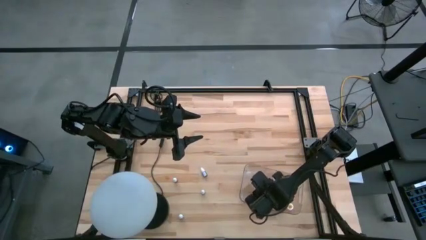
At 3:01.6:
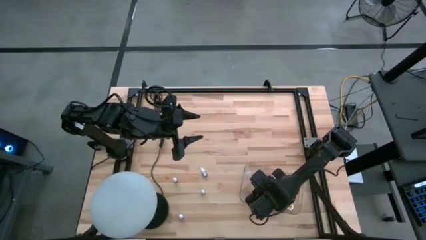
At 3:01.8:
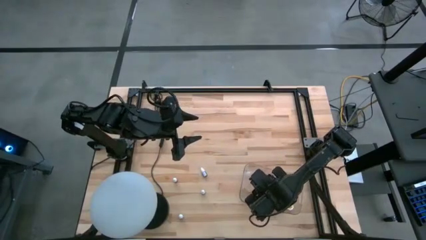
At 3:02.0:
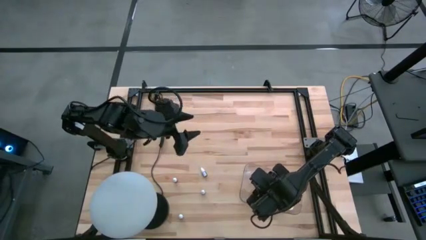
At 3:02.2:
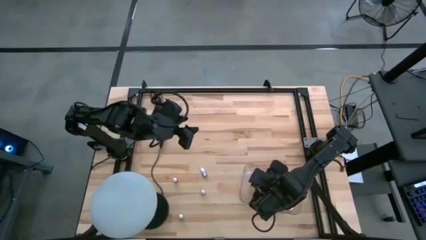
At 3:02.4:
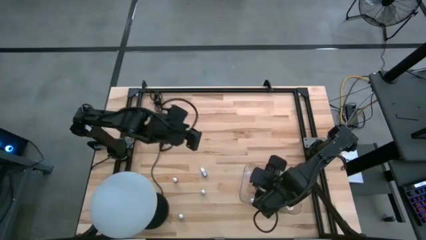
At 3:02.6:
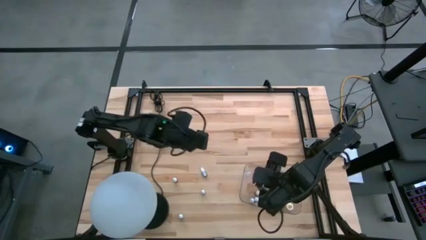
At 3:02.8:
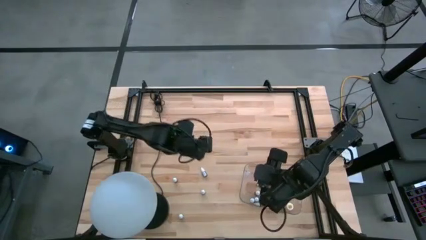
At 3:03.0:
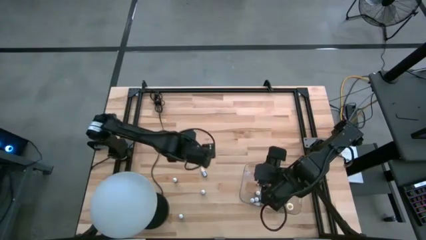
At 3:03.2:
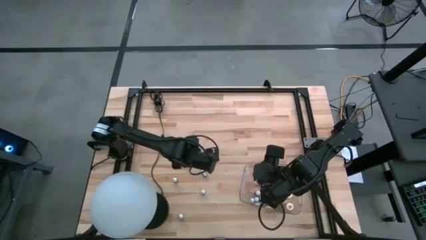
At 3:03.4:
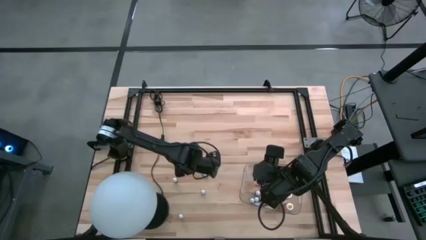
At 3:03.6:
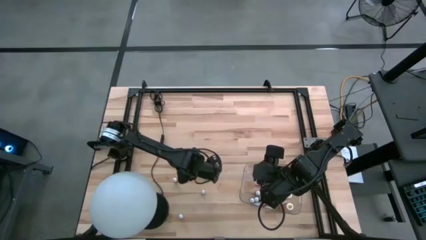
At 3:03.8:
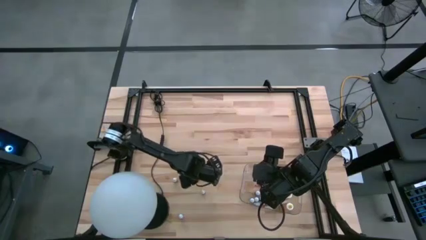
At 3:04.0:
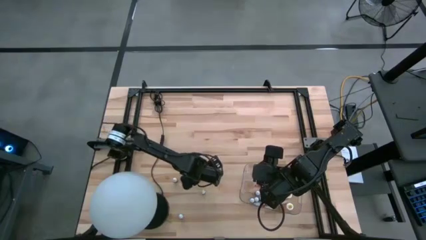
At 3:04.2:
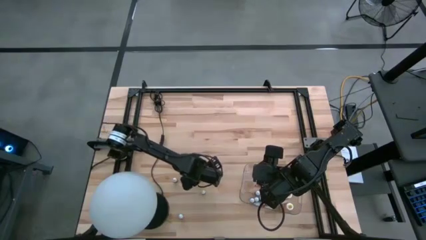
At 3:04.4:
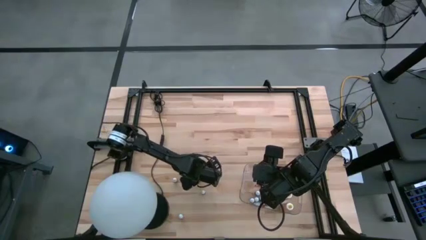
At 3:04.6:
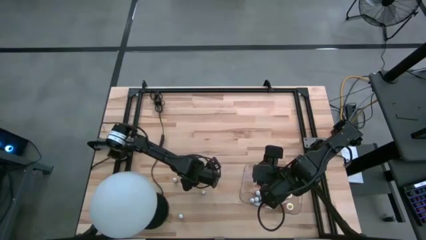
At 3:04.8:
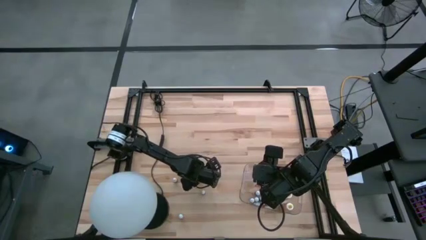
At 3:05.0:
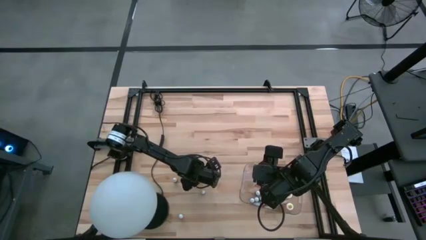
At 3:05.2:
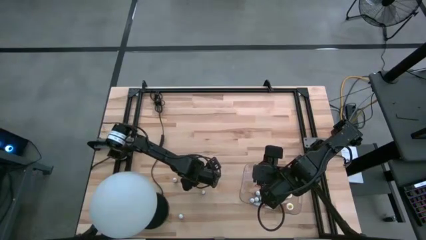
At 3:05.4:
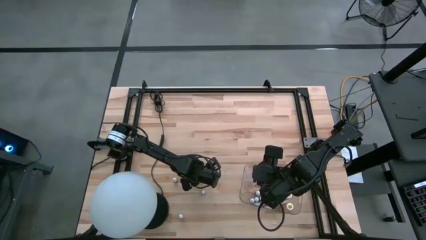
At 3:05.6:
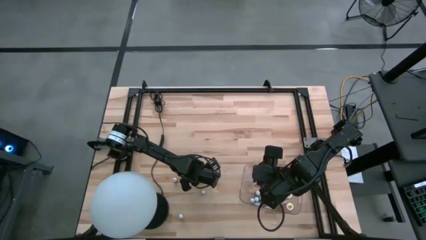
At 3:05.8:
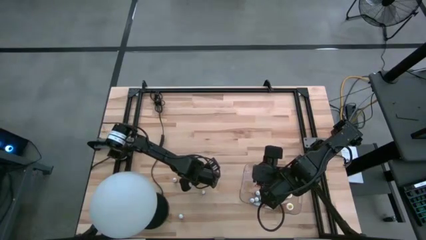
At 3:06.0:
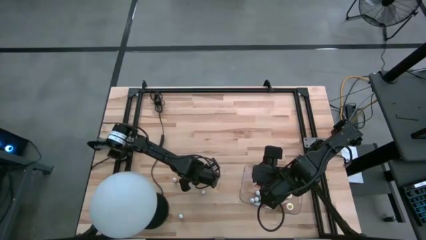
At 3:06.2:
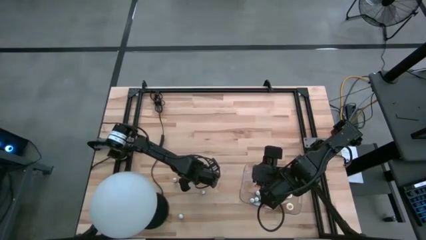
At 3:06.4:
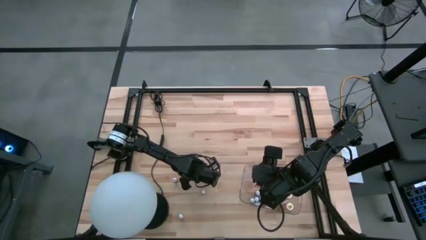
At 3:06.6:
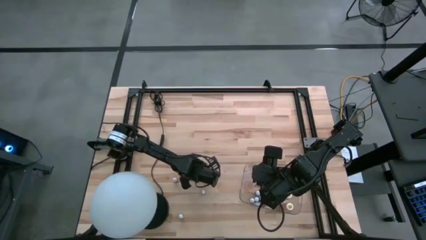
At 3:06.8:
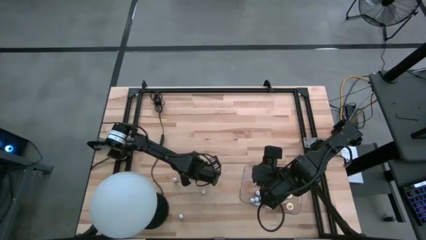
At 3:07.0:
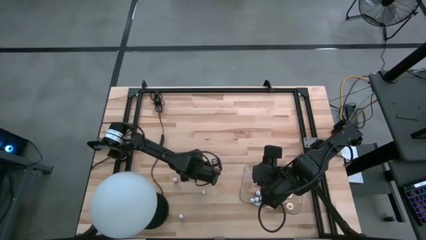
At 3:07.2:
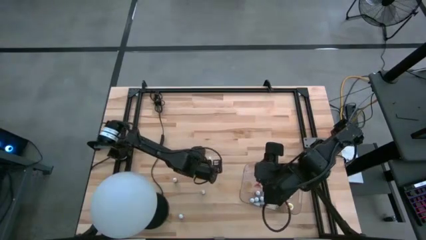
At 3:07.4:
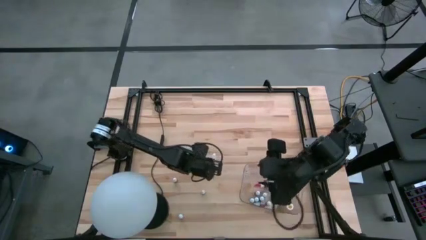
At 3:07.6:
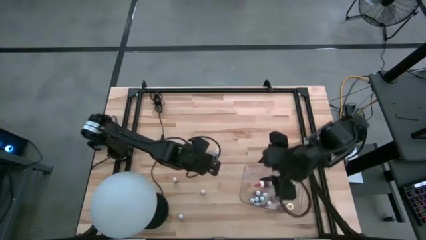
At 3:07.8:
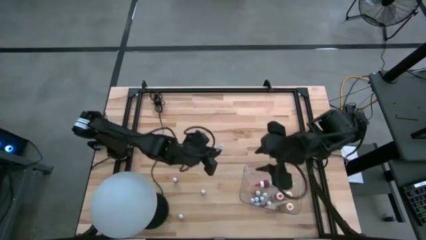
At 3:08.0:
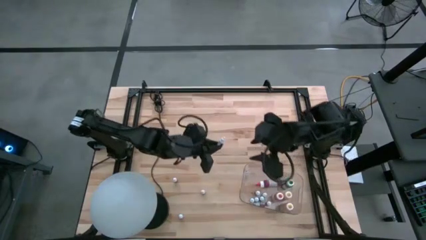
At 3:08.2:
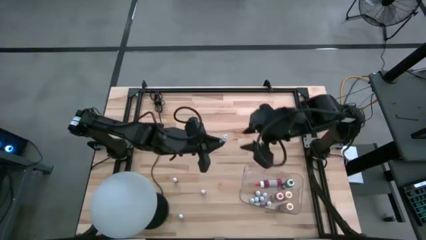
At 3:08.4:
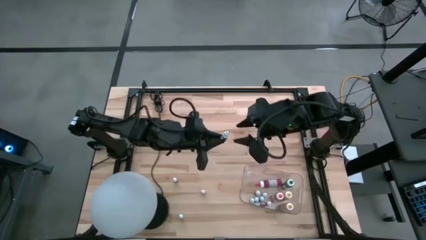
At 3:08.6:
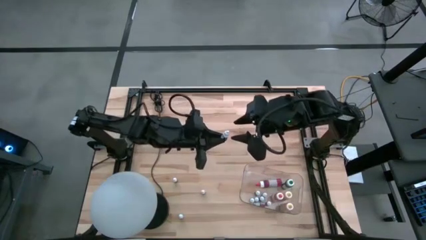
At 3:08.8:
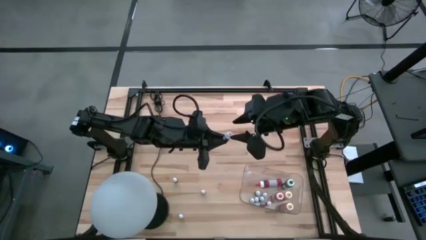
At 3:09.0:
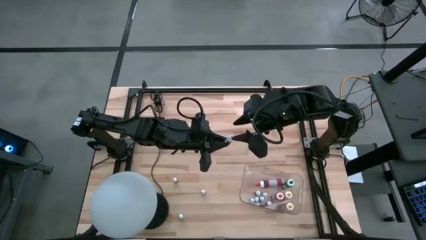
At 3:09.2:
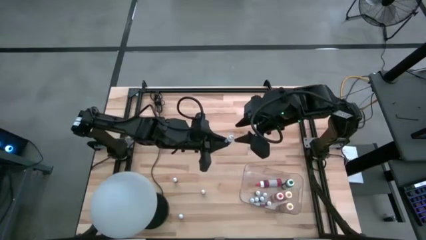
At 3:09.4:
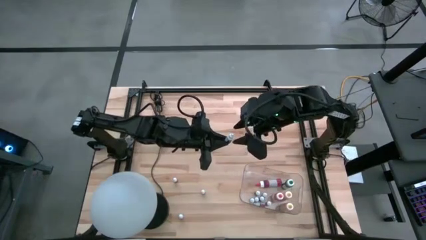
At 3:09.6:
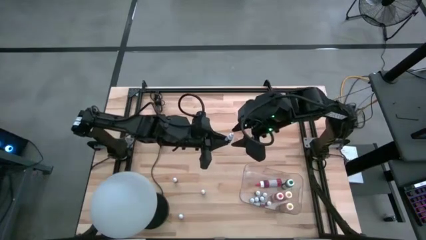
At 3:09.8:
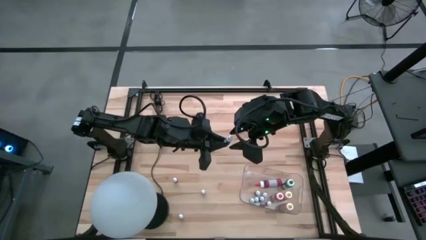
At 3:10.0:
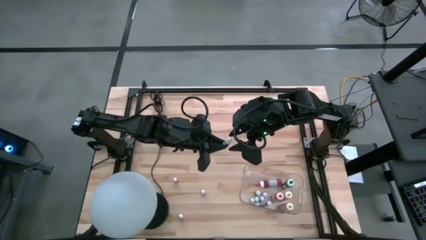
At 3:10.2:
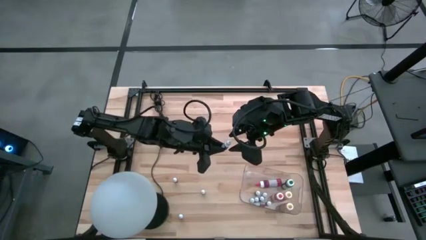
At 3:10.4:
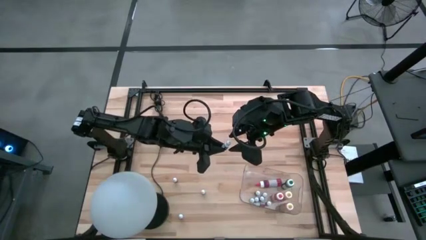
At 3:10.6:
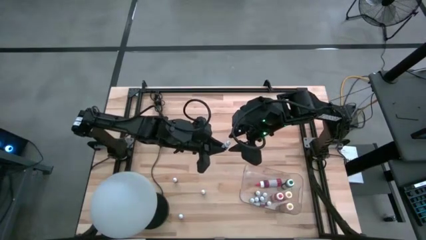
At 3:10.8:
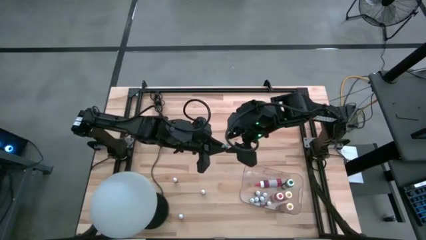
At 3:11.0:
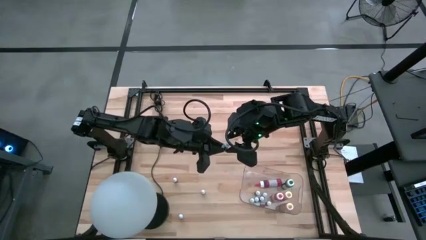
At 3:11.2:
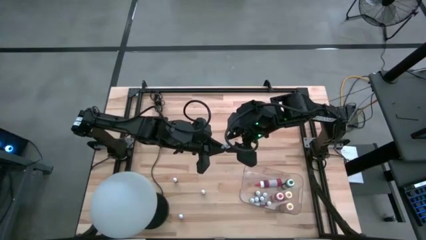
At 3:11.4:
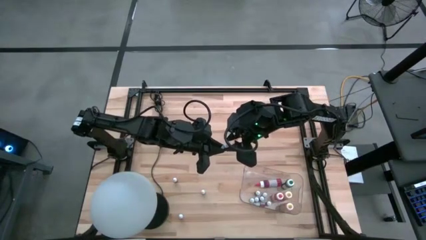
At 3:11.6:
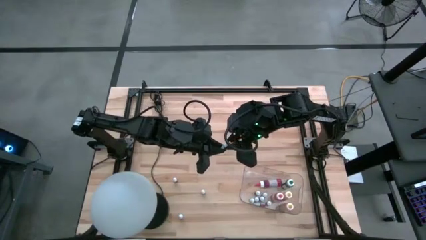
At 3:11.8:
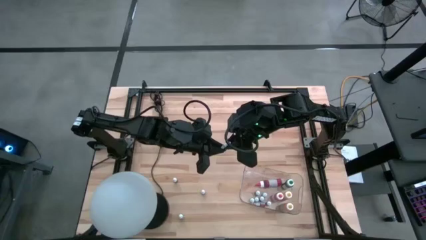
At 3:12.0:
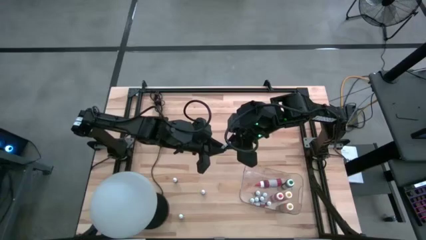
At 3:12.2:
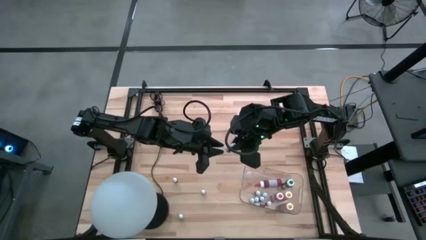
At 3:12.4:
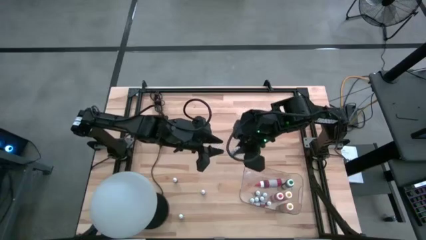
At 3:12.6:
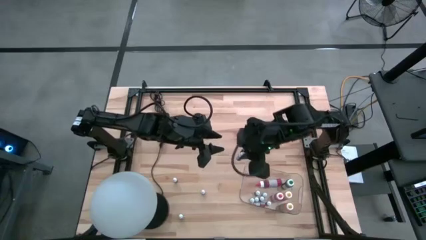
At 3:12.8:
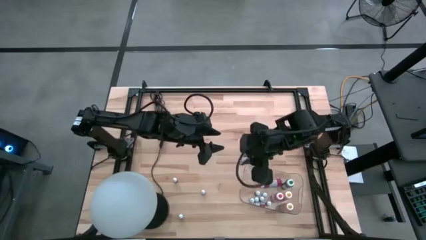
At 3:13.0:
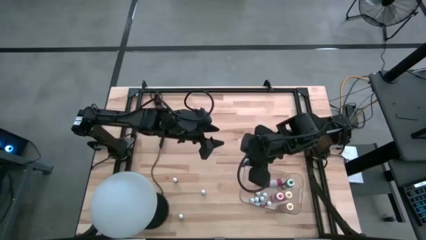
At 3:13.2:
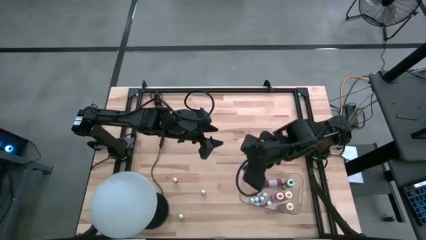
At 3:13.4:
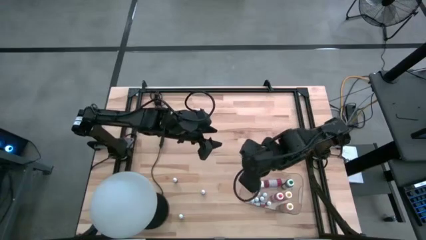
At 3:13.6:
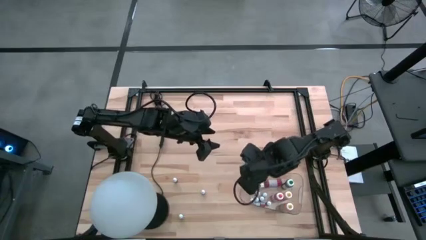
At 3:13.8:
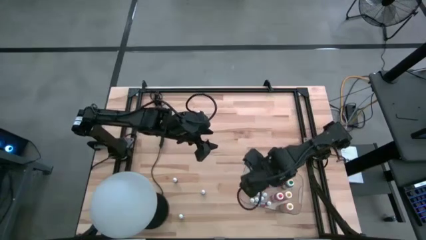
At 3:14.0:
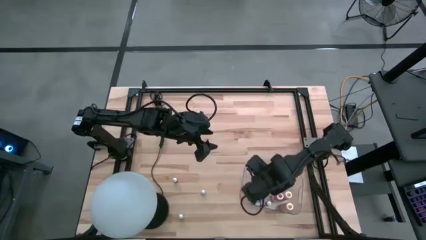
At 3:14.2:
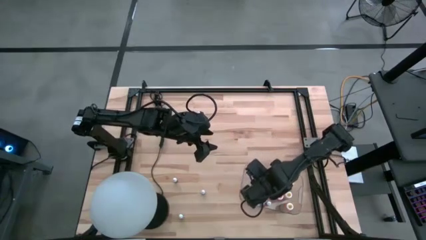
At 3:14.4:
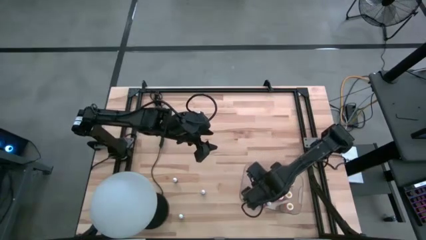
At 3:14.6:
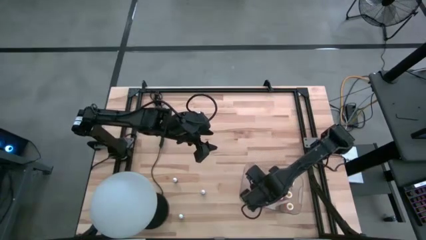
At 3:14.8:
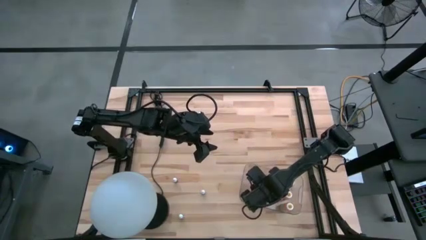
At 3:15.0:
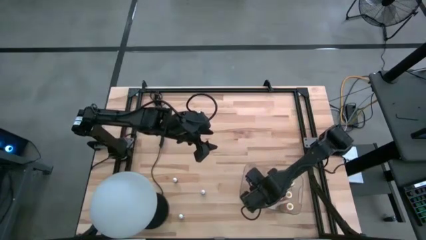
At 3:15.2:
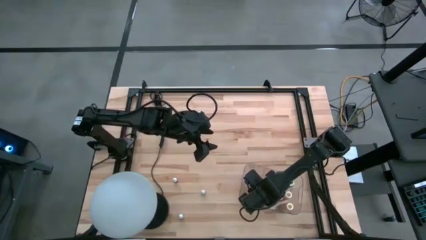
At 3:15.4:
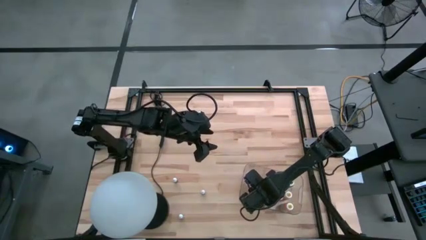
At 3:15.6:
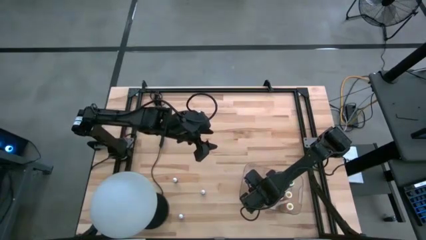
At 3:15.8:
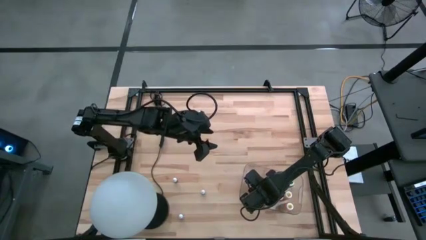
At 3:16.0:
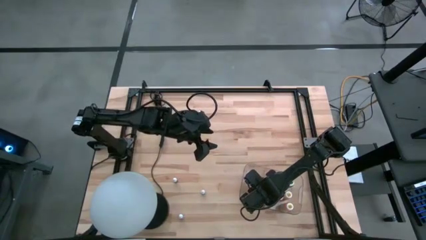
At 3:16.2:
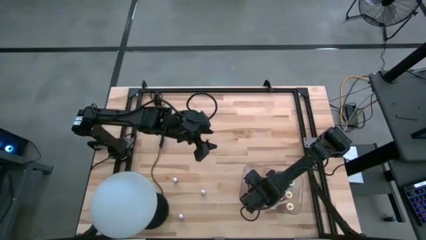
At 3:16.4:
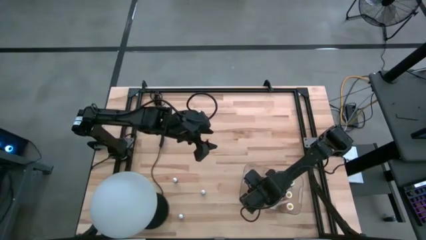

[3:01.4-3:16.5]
Task: Pick & Place food coloring
Put the green food color into the transparent bin

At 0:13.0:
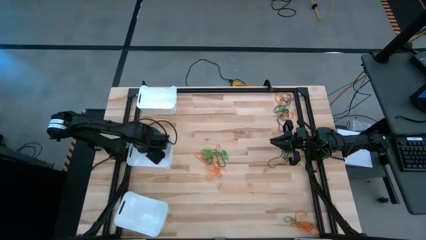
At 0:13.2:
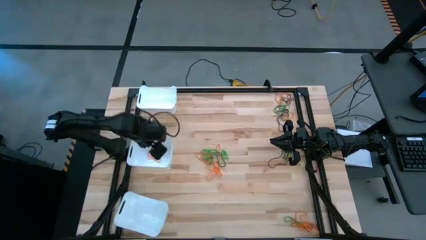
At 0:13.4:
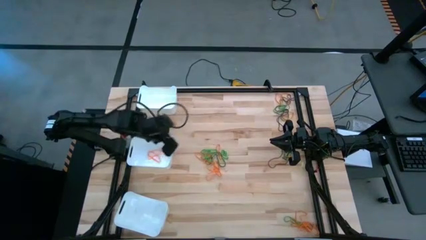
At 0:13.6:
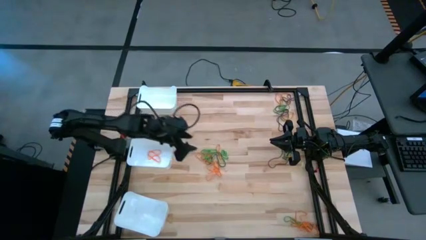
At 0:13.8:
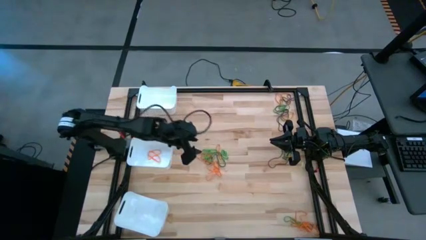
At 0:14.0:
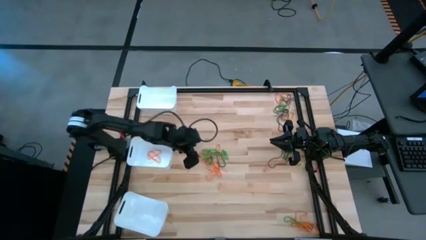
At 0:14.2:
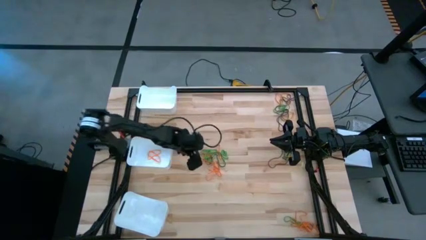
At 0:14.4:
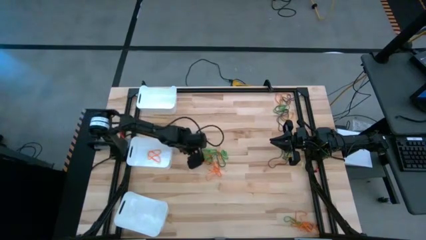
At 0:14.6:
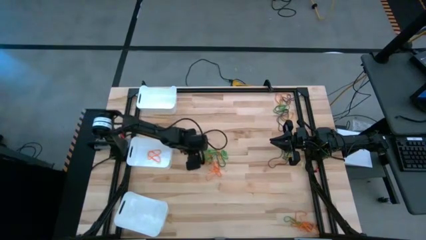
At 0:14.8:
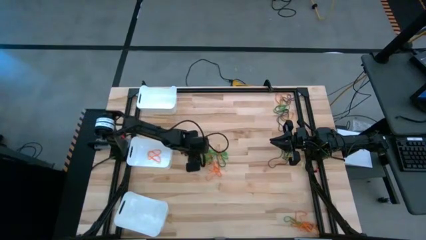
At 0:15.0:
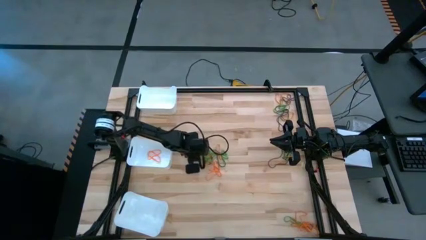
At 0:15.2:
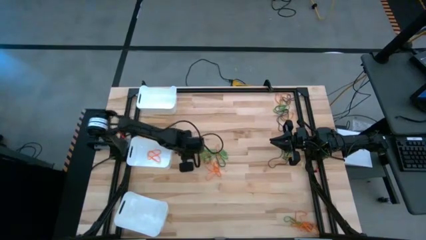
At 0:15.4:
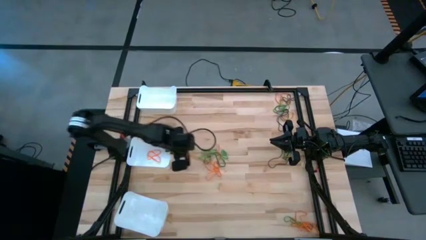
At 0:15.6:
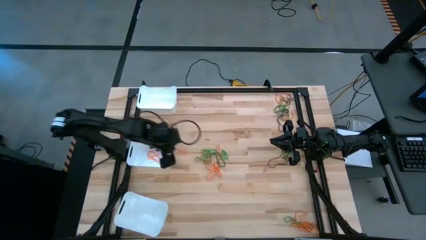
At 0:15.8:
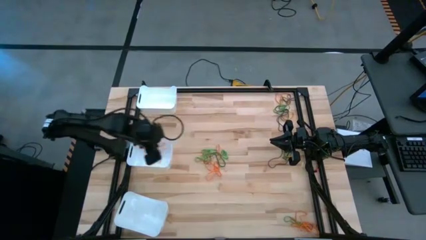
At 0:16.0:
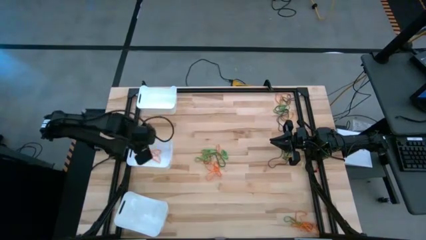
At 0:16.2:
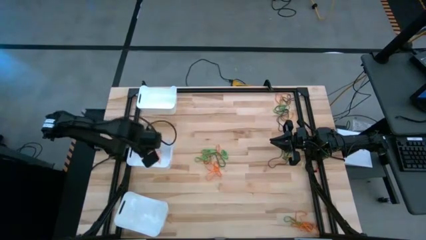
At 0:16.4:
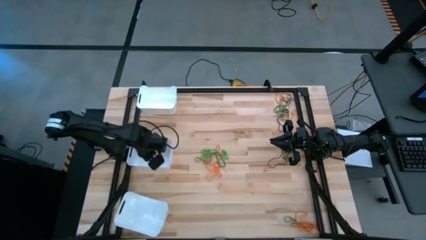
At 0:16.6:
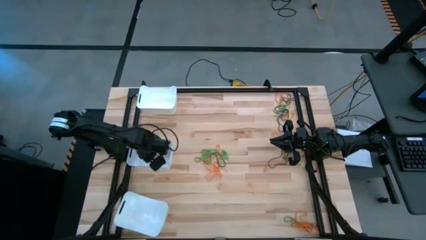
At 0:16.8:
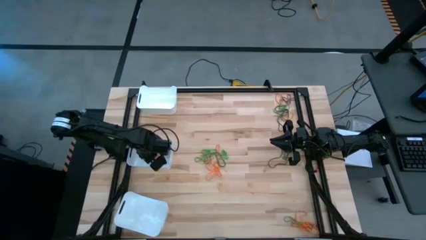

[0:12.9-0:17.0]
Task: Sort rubber bands into baskets
Put the orange rubber band into the middle white bin
